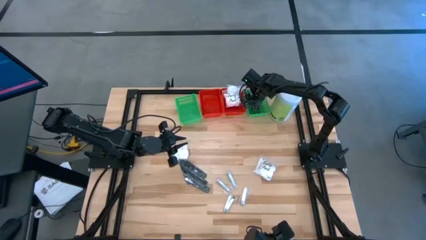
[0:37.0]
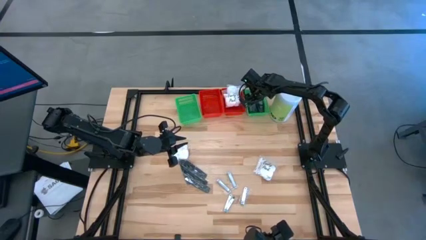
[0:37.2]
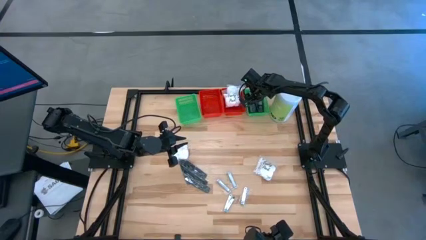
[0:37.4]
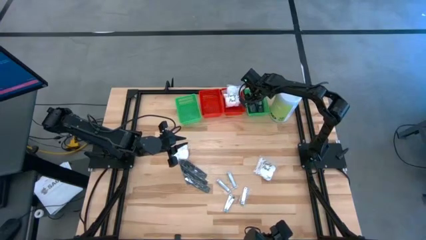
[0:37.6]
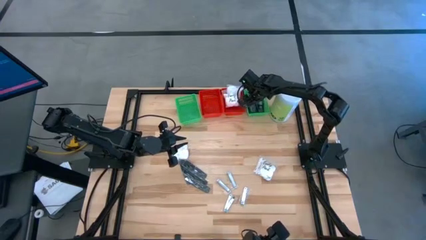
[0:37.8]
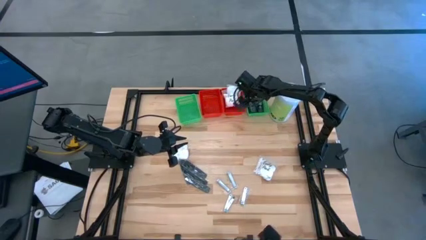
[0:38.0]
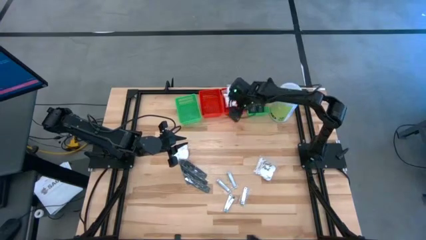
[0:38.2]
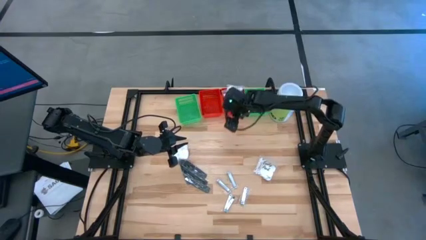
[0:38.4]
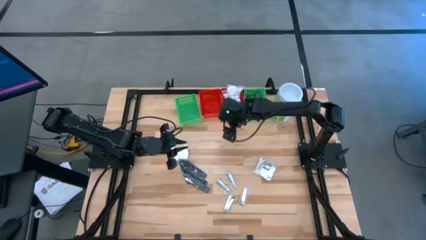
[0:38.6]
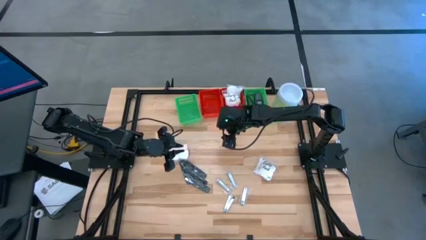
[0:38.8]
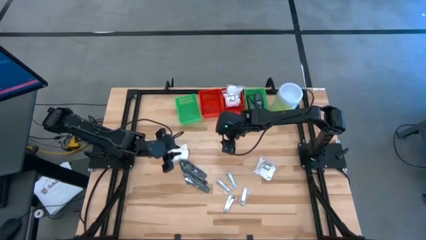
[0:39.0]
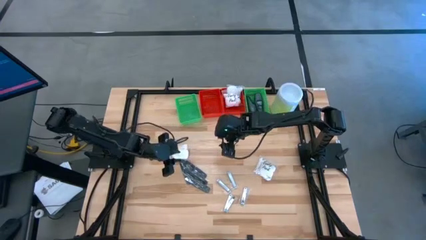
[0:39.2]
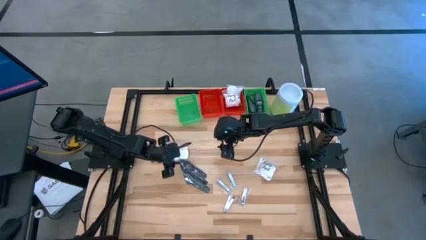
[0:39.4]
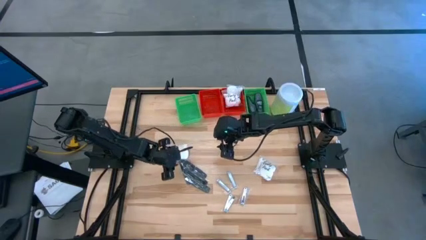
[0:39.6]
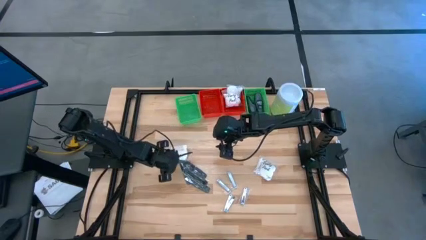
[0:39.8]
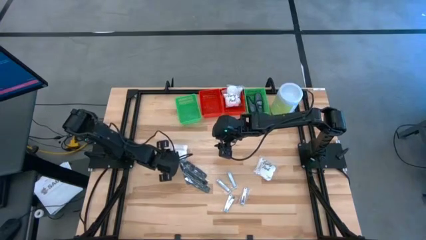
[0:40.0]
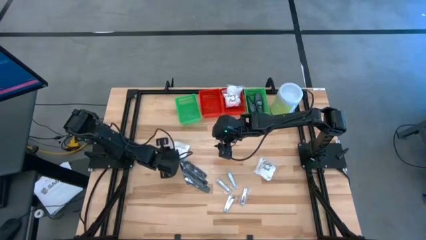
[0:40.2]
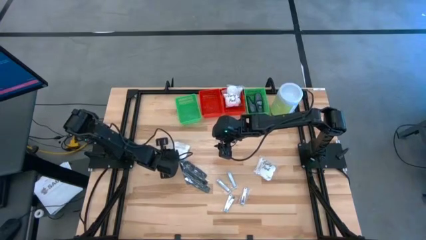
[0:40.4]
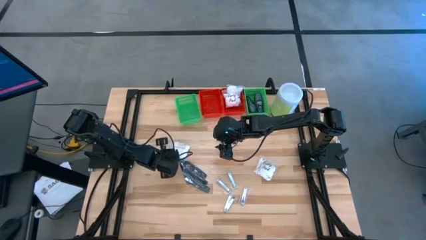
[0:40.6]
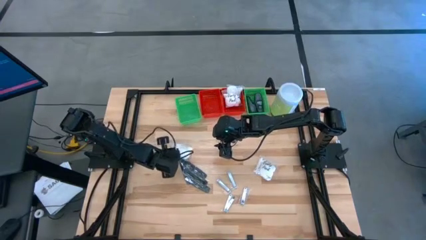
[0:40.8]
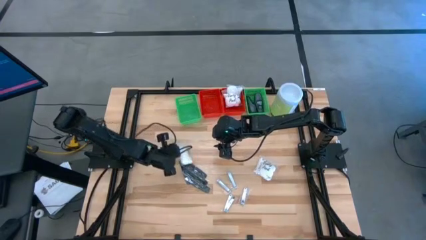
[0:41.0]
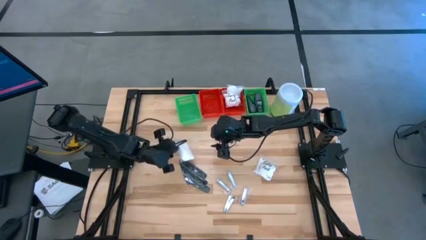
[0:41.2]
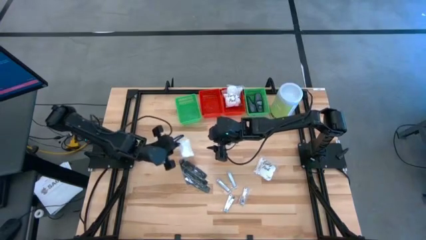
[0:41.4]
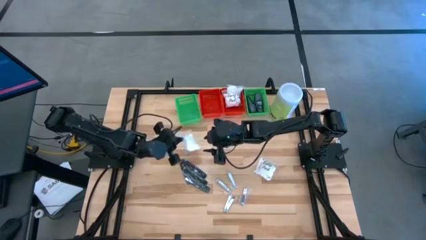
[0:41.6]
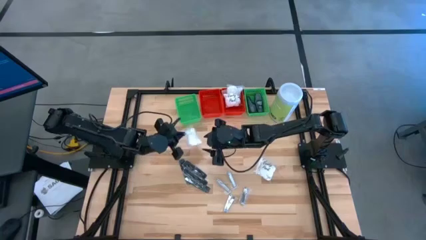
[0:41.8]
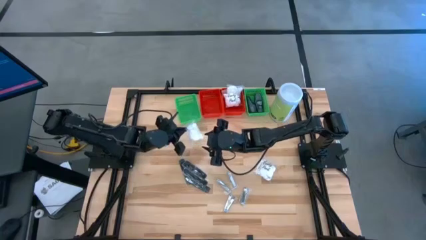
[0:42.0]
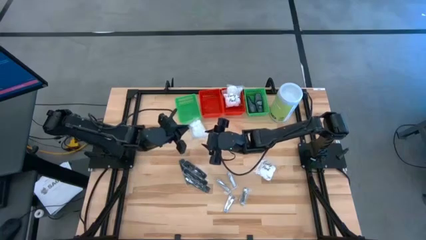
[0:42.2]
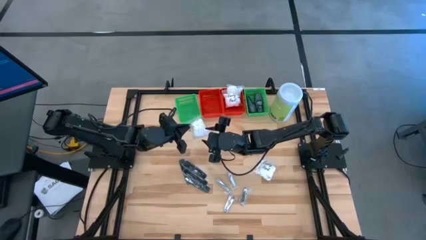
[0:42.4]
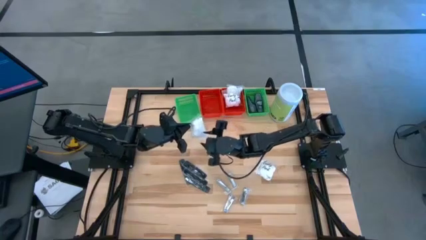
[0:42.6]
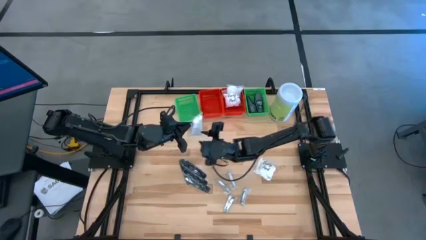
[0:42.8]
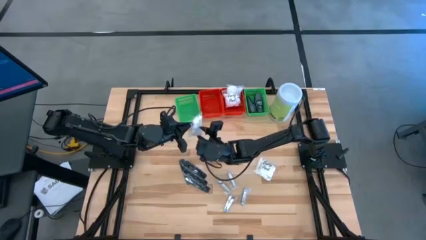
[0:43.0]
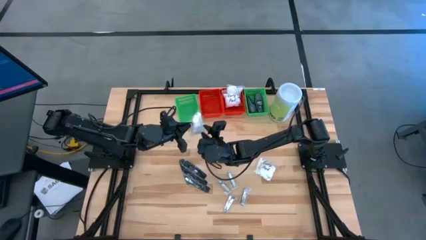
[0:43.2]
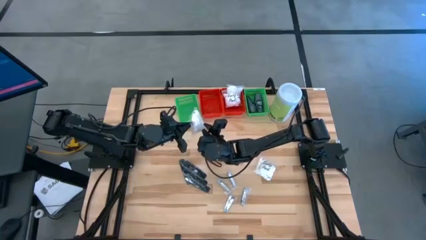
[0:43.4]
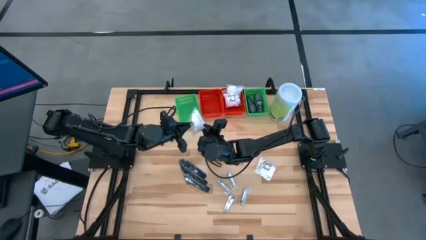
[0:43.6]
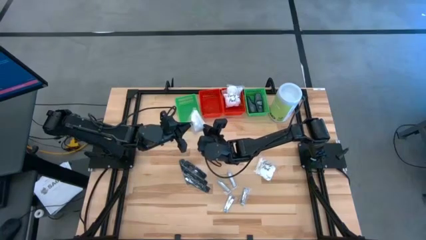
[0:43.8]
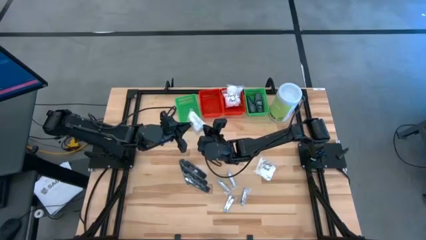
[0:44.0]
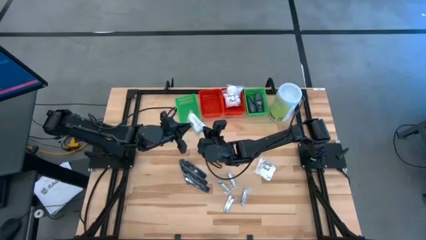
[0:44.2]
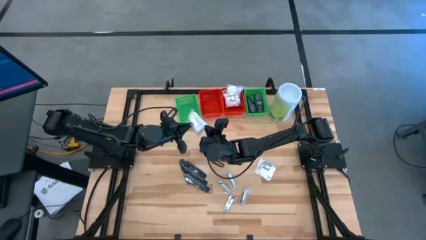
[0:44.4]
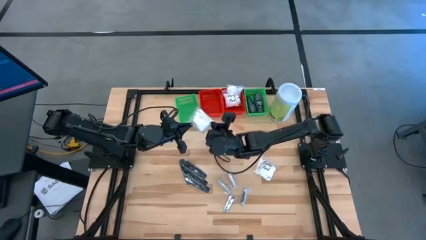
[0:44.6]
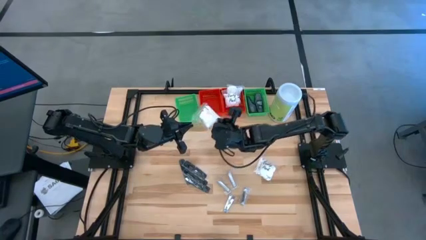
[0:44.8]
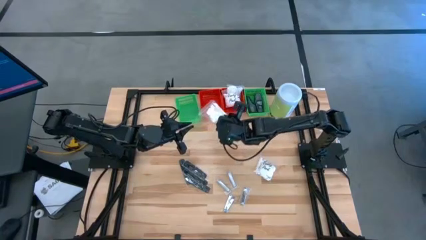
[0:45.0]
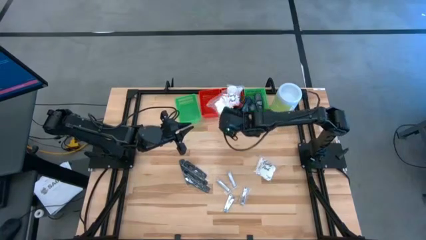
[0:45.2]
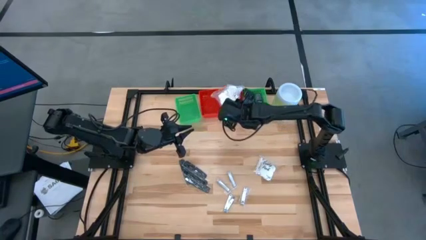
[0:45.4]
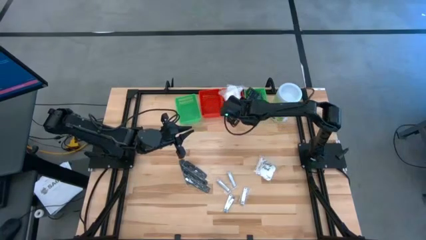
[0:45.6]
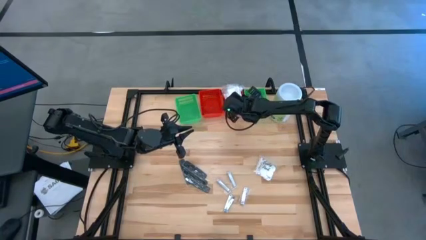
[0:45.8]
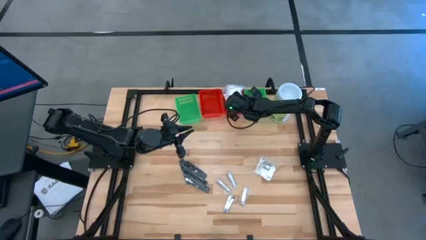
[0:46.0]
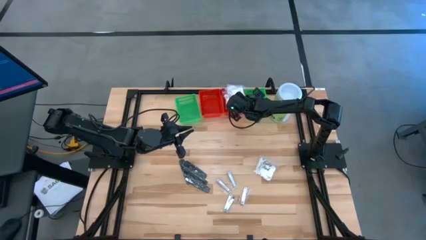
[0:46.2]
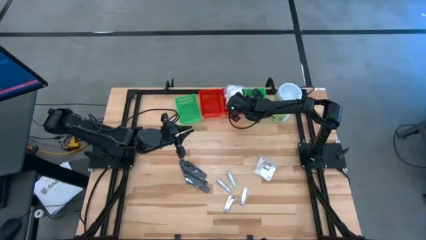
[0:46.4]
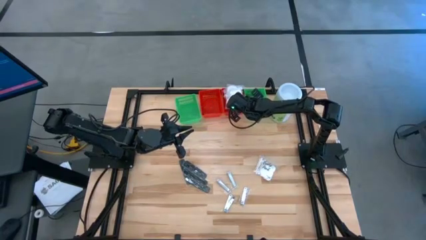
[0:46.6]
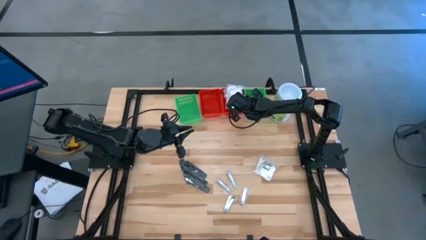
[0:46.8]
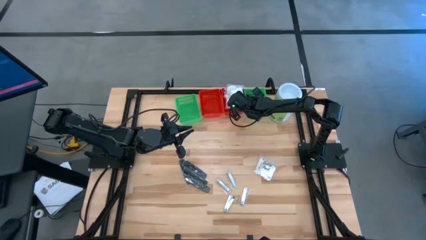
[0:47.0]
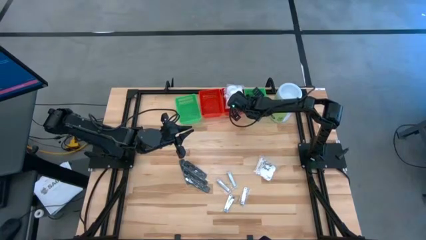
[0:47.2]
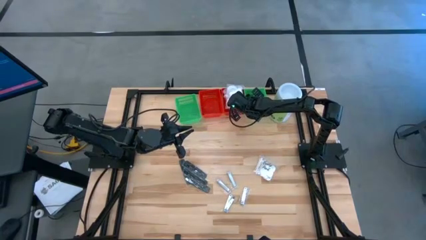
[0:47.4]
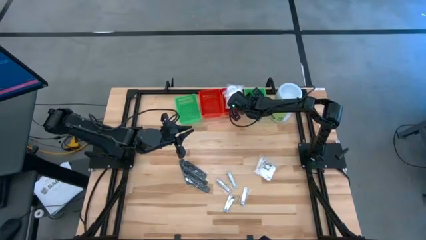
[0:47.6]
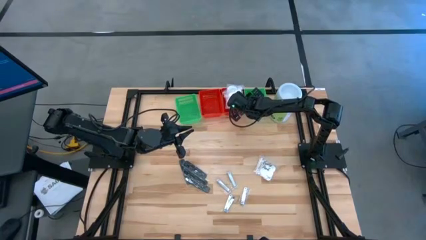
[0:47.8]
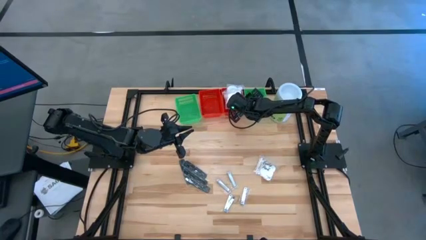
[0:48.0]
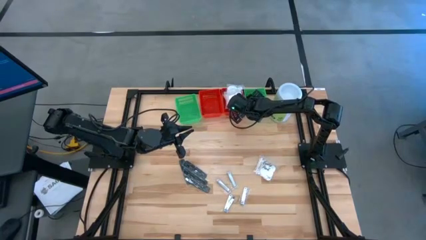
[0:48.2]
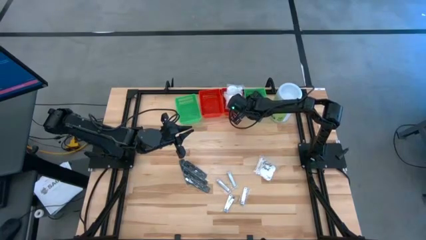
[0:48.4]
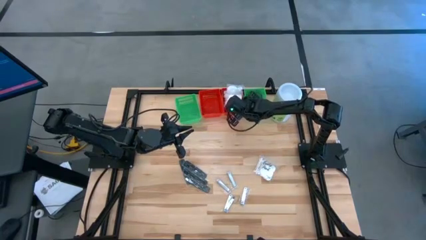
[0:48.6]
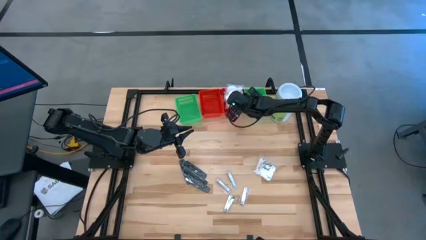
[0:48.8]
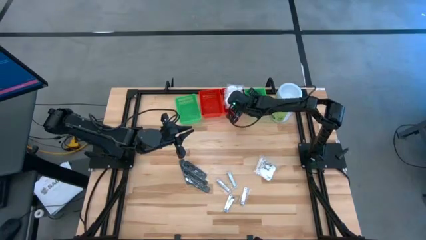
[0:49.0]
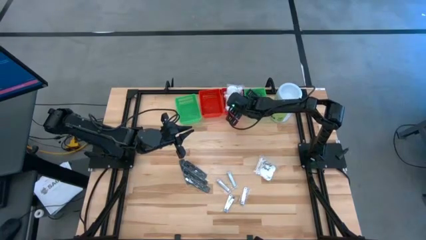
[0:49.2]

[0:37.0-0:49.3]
Task: Pick & Place Travel size toiletries
Put the white cotton pack into the right red bin
